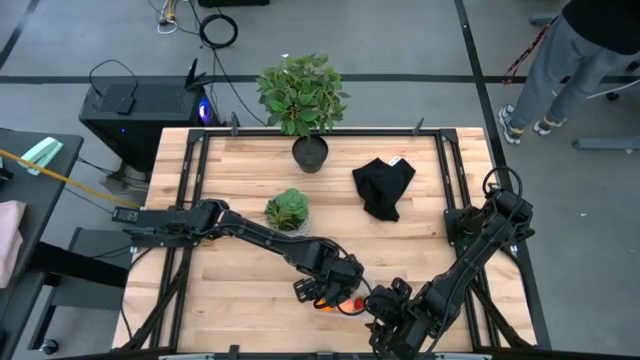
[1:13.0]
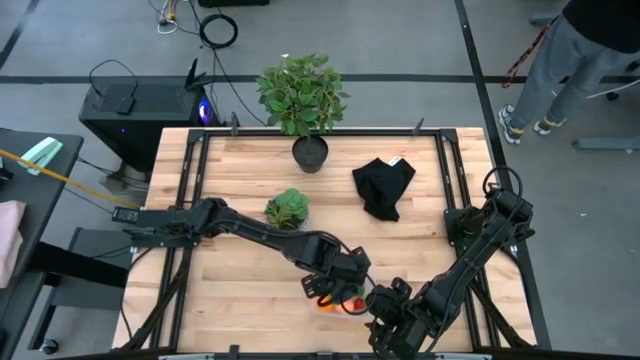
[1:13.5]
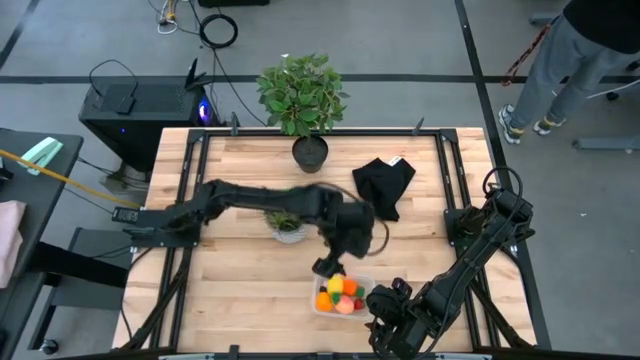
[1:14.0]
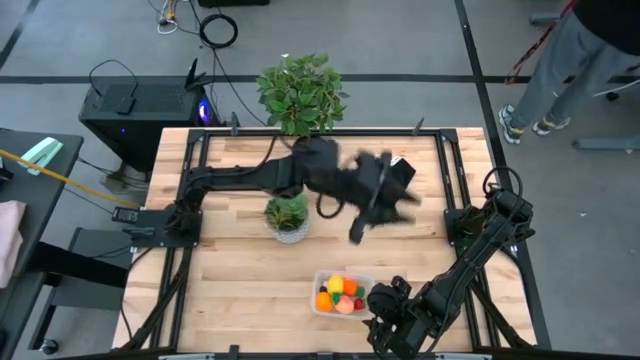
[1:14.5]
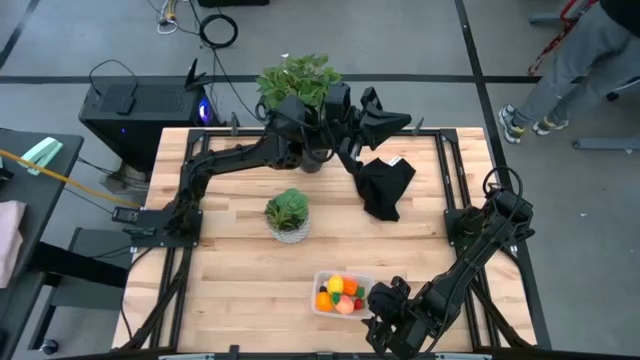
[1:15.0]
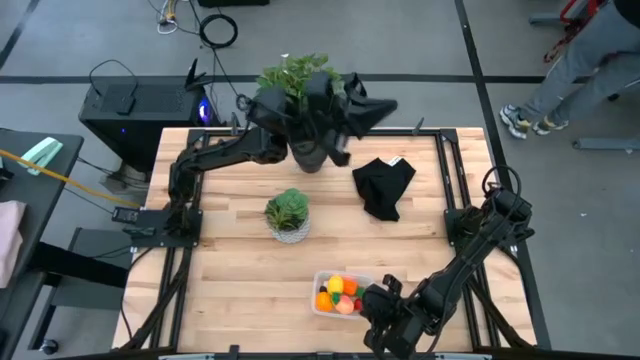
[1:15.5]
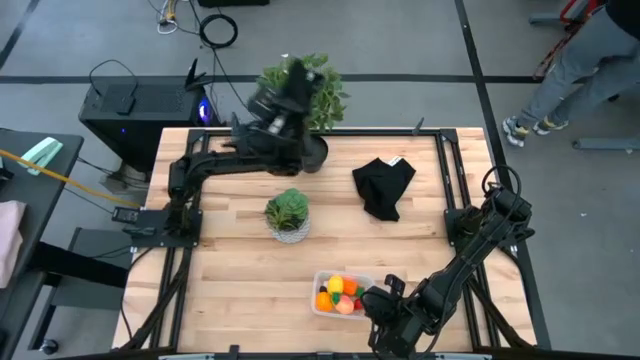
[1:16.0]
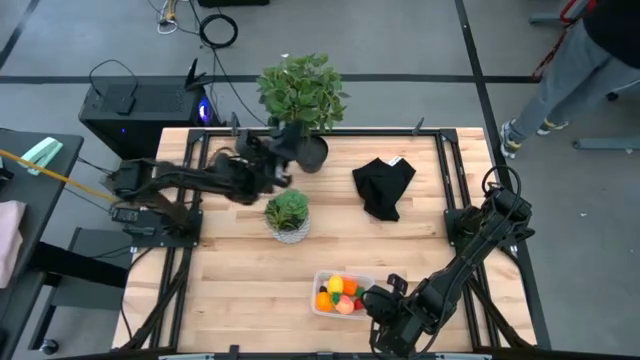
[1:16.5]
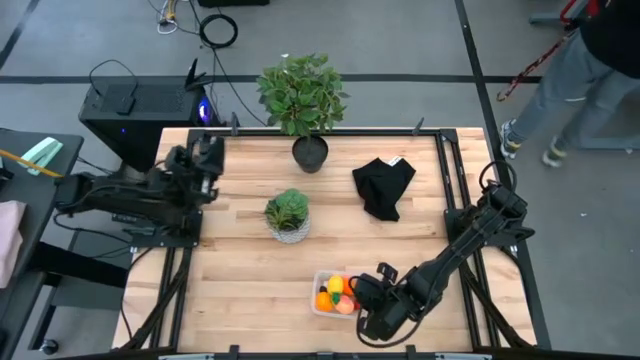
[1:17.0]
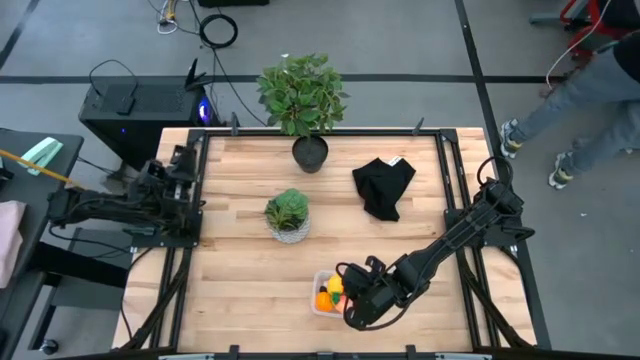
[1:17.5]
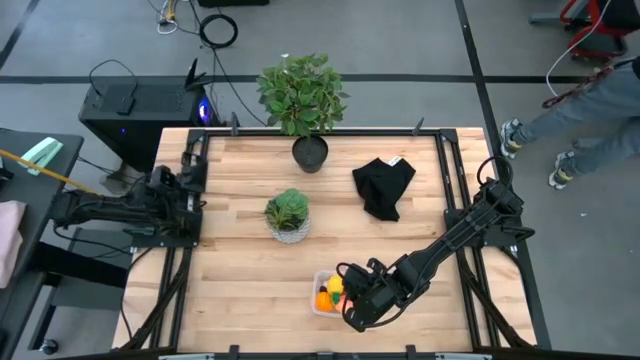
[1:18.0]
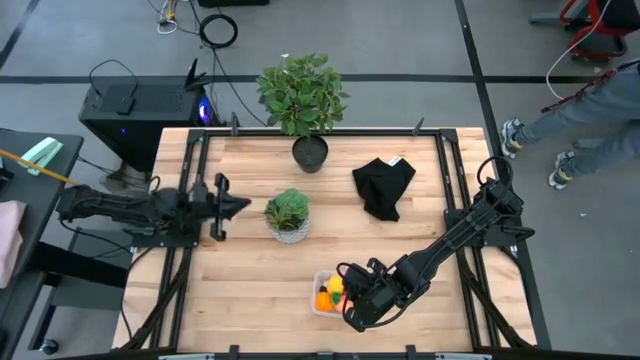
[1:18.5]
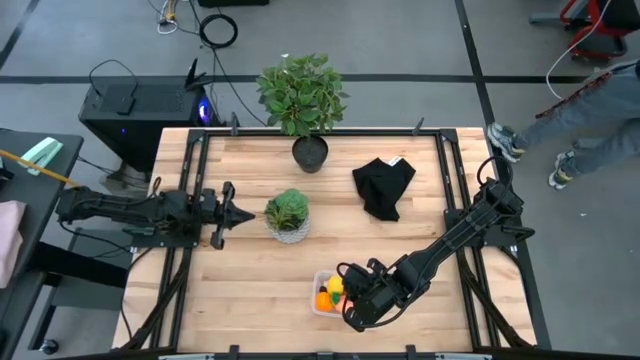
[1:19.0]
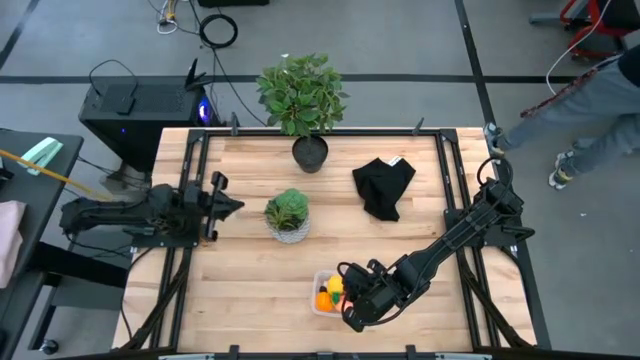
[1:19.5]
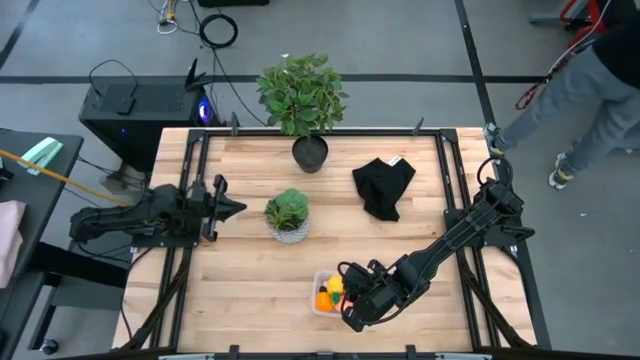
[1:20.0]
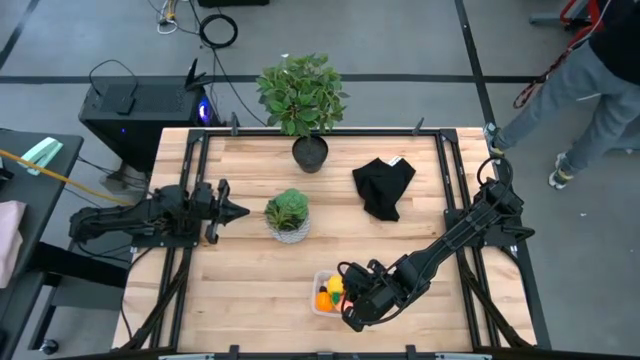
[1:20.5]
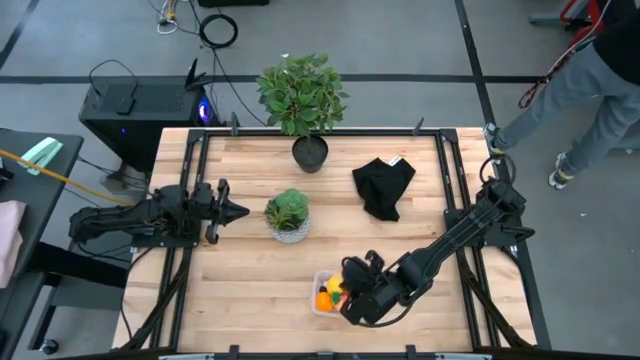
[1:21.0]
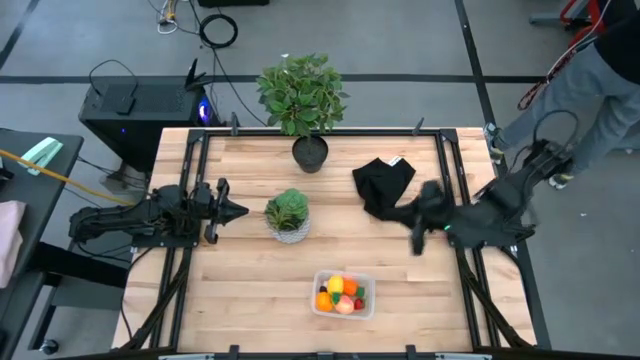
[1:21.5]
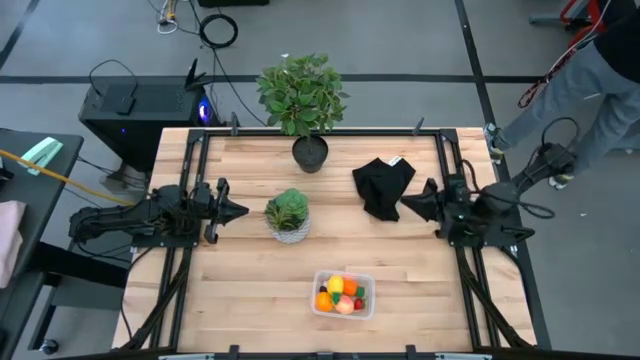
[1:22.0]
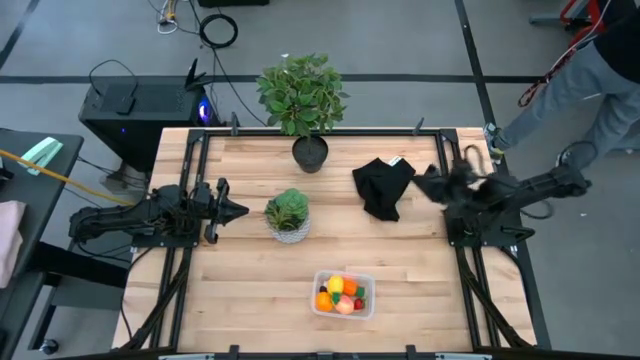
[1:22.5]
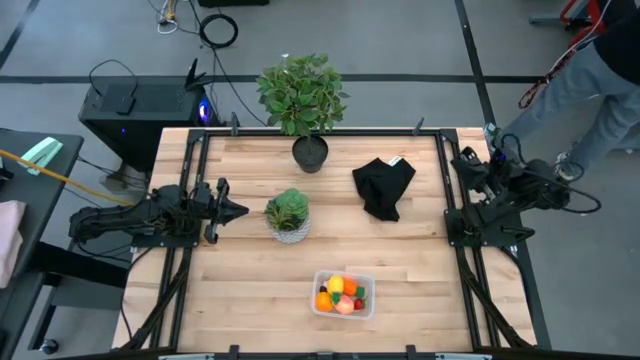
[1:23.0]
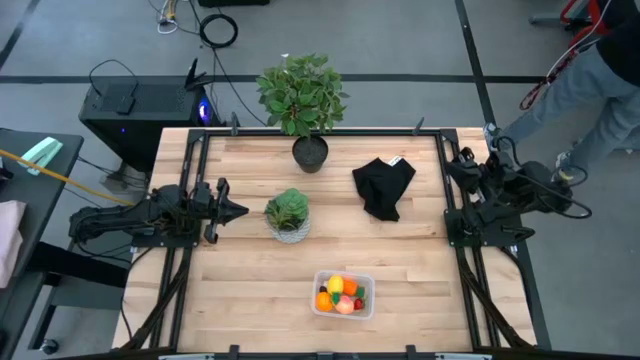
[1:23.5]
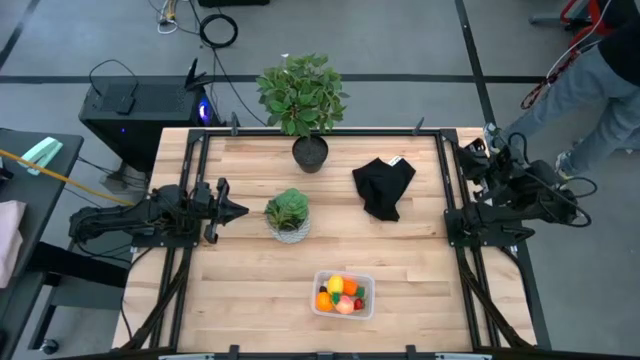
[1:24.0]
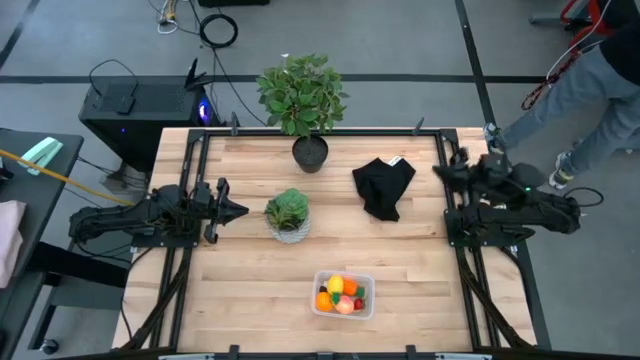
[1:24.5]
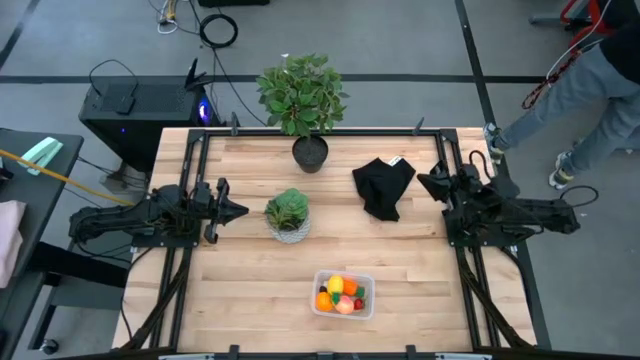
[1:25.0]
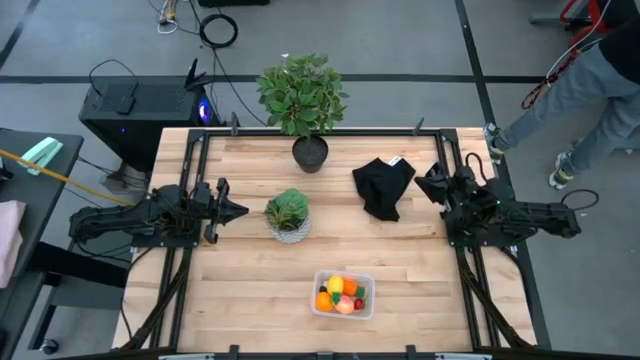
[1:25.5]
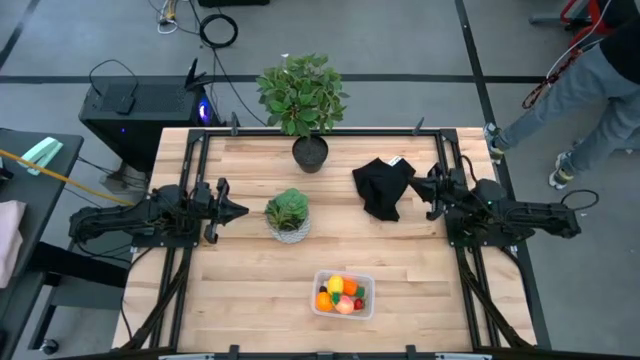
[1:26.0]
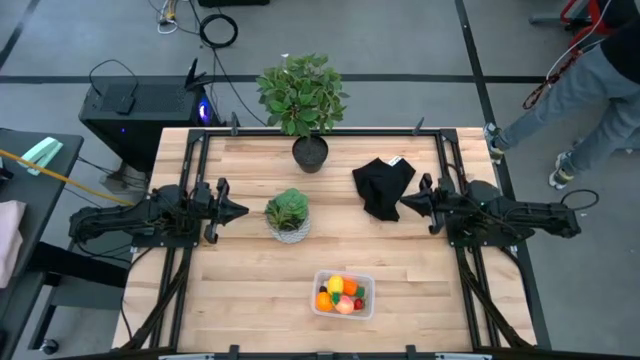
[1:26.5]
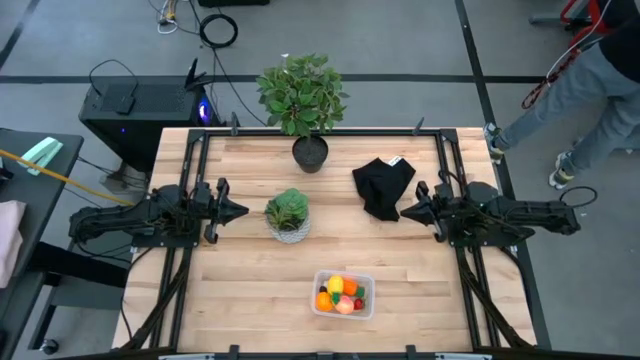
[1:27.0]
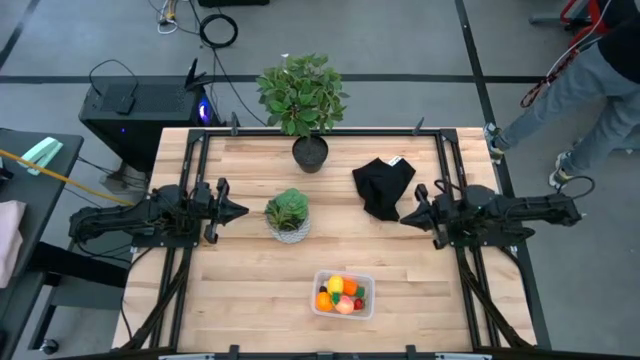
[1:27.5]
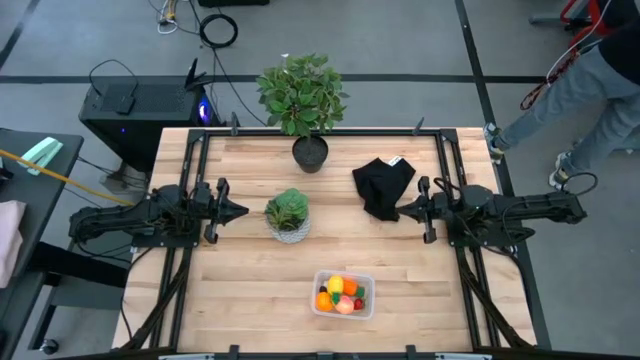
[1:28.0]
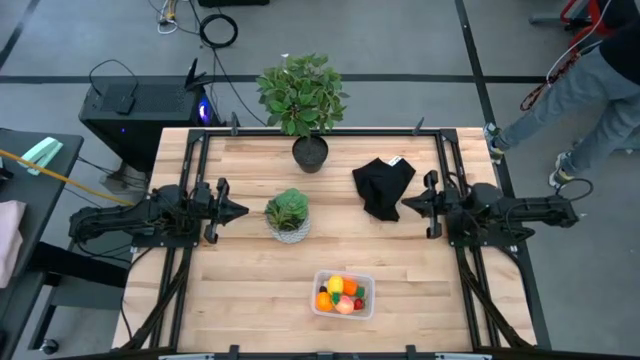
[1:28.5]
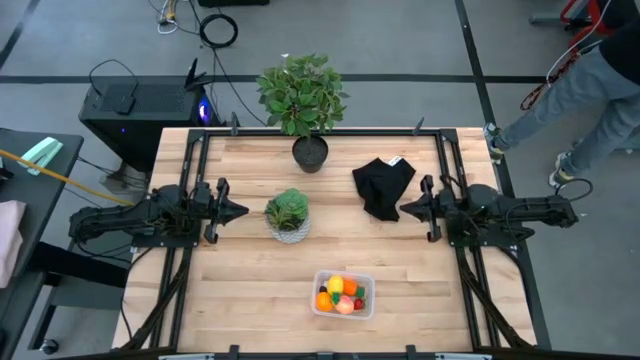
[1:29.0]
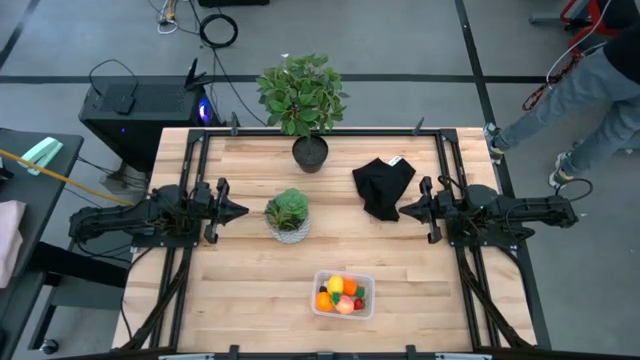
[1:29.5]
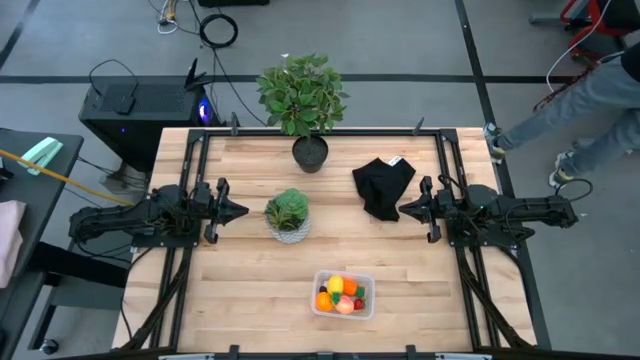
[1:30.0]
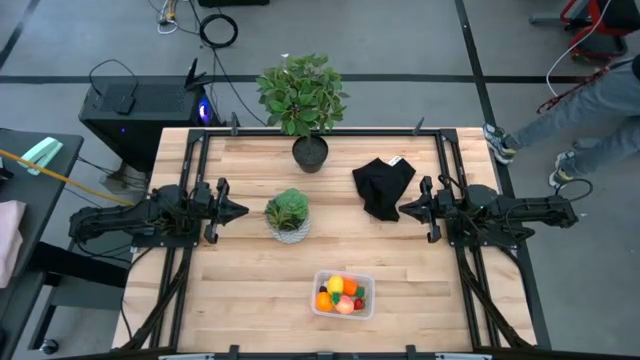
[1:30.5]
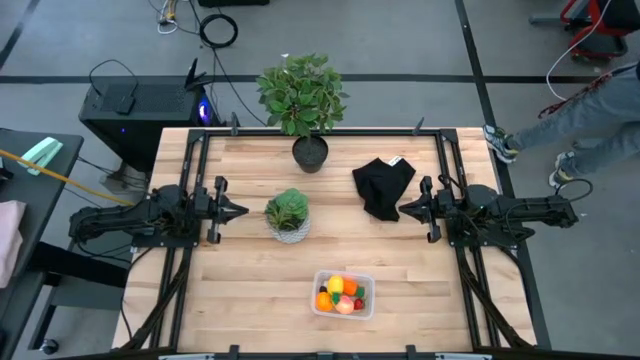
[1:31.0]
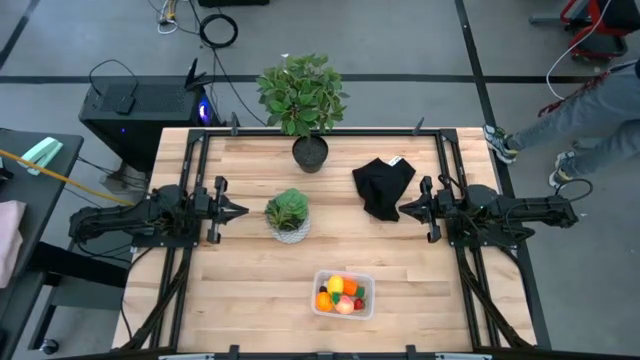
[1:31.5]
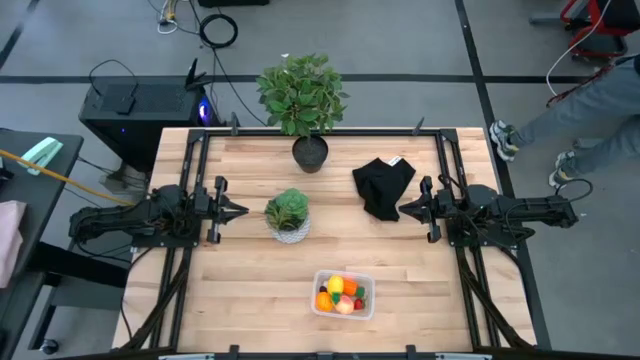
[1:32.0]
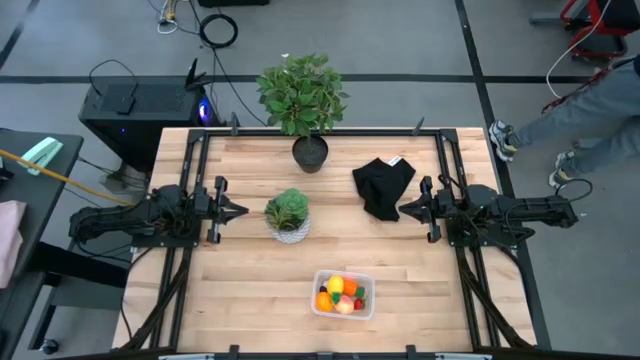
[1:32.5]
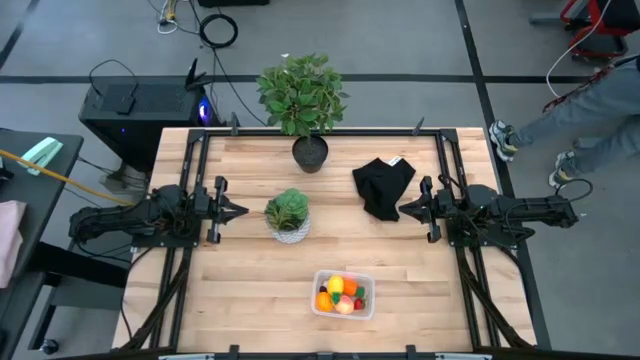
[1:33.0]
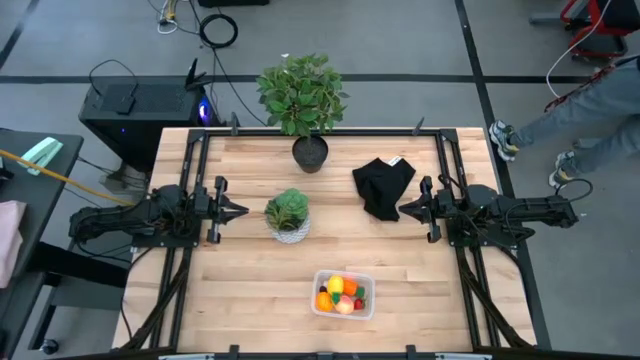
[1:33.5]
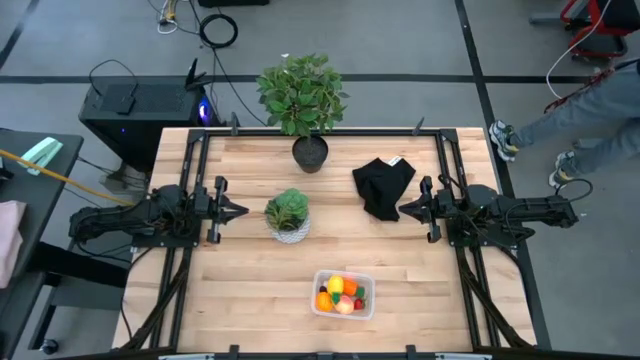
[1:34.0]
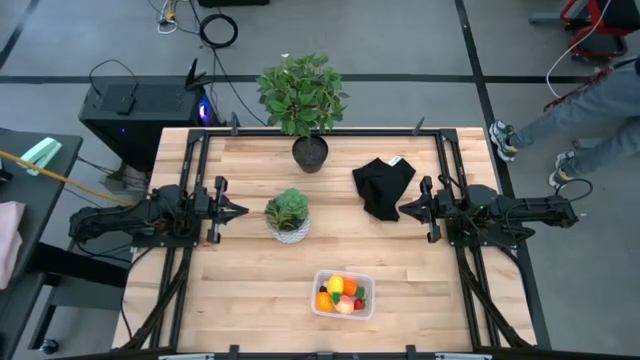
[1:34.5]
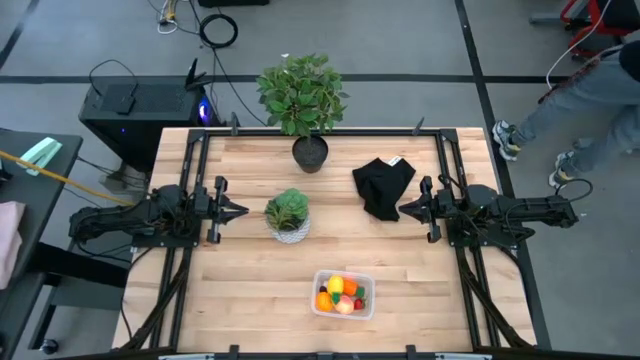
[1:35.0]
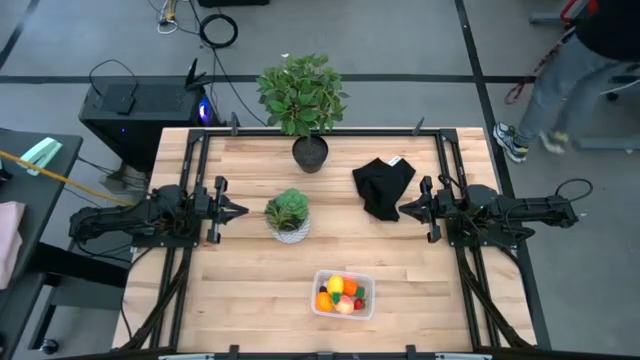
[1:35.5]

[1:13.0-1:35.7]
Task: Pick and placing Produce into tupperware
Return to Home Position
